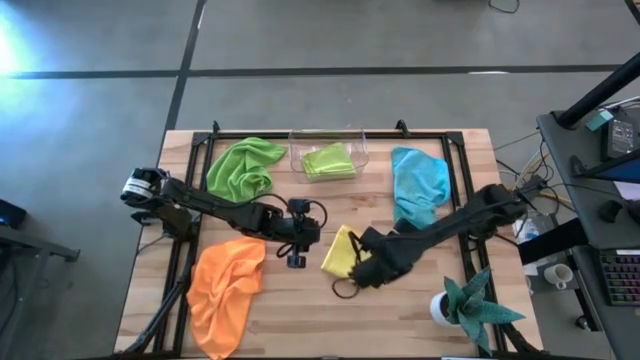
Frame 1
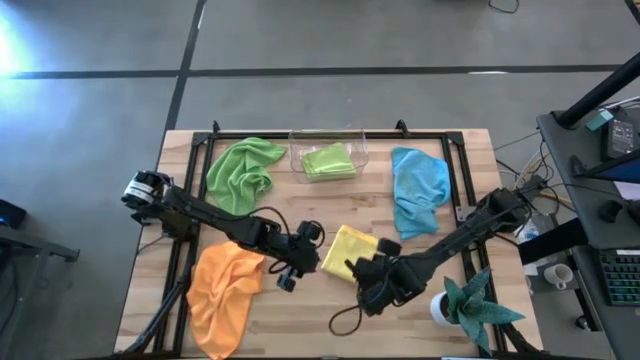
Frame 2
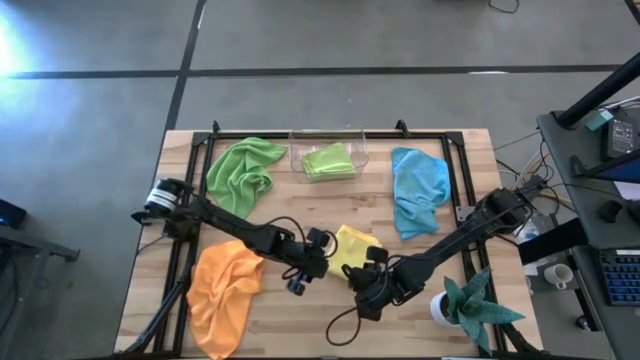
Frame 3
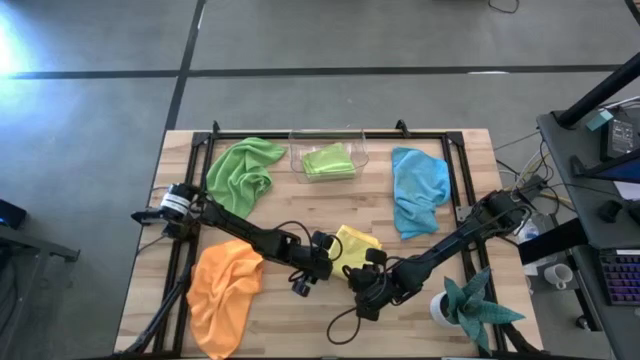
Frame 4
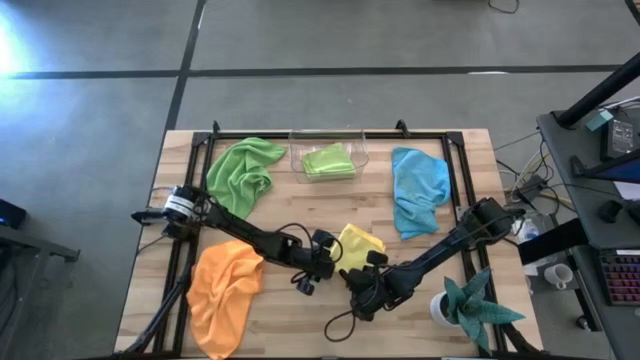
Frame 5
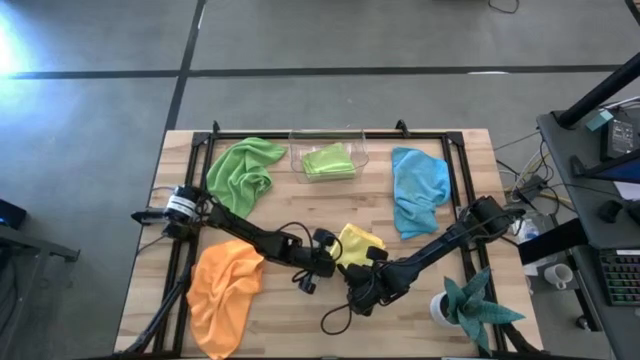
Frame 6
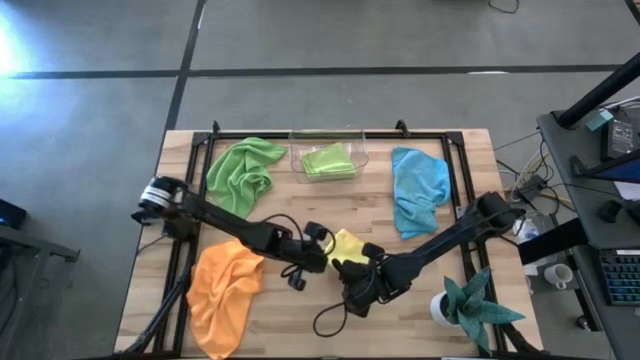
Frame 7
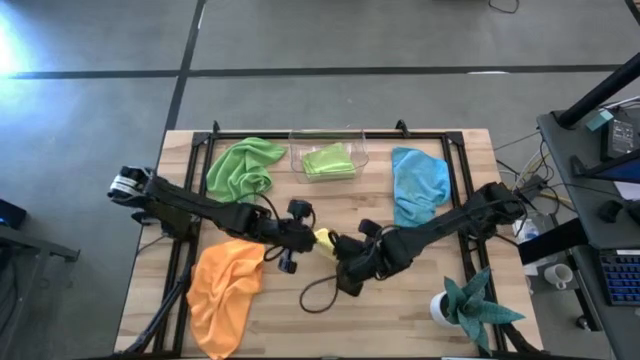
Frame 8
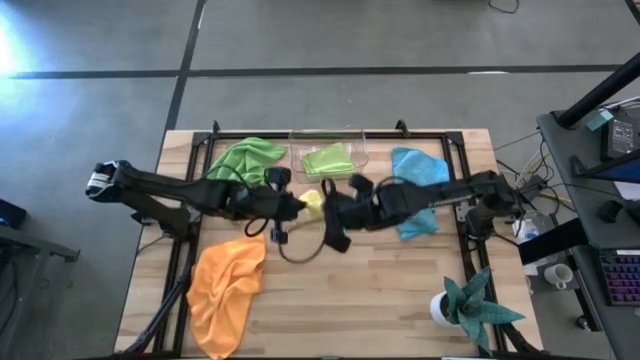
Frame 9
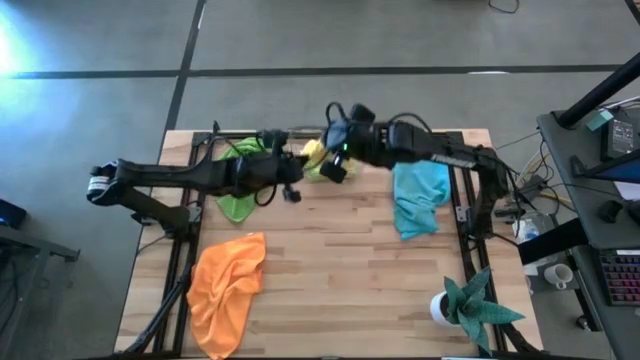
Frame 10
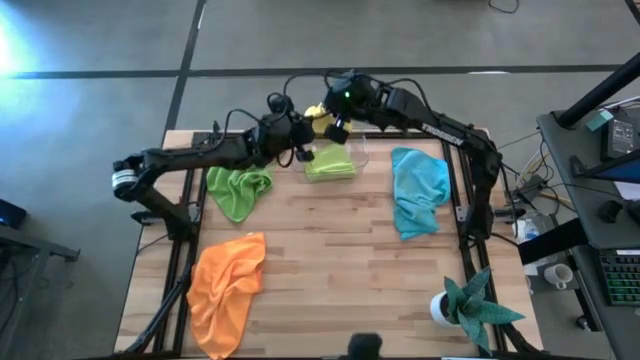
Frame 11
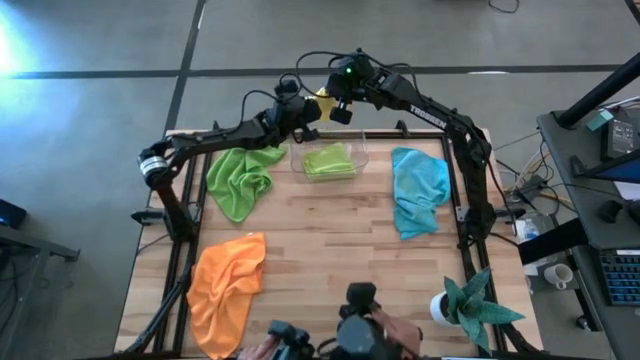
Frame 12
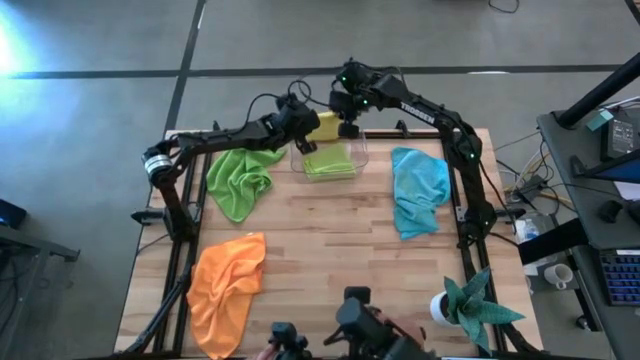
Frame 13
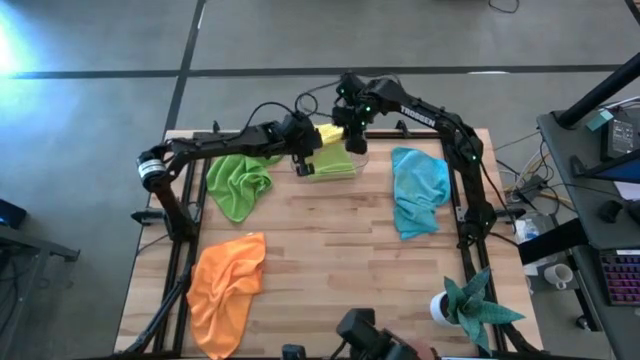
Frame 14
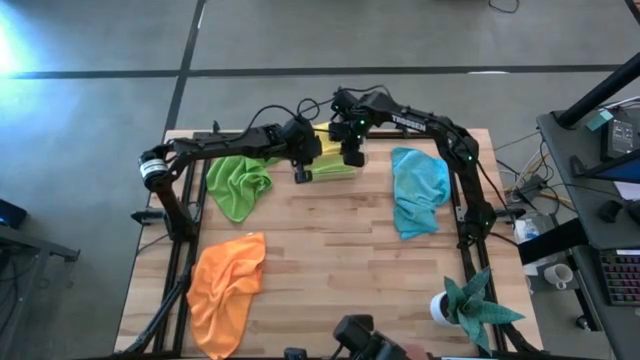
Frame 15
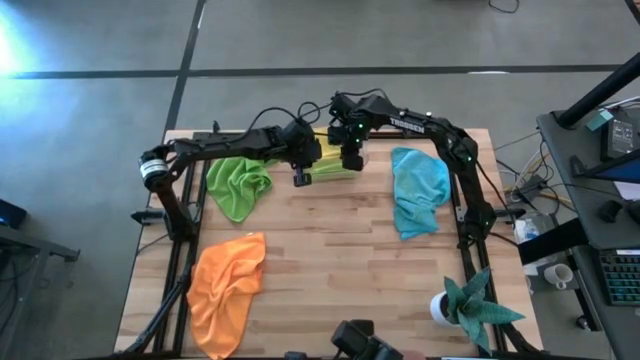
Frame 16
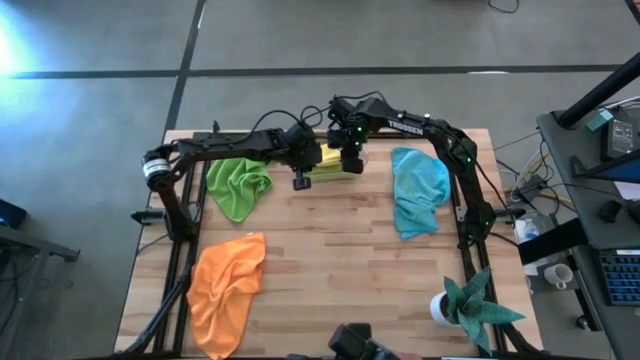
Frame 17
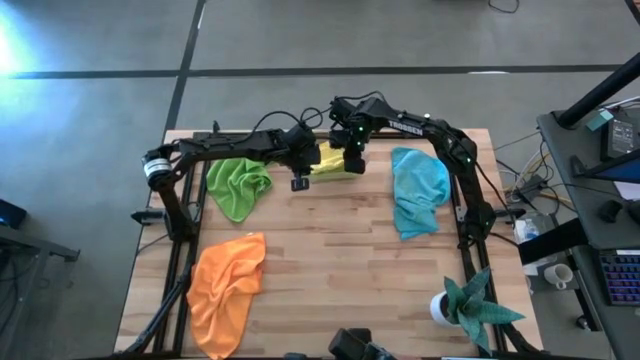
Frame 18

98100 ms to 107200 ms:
Task: Fold microfiber towels
Put the yellow microfiber towel into the transparent bin

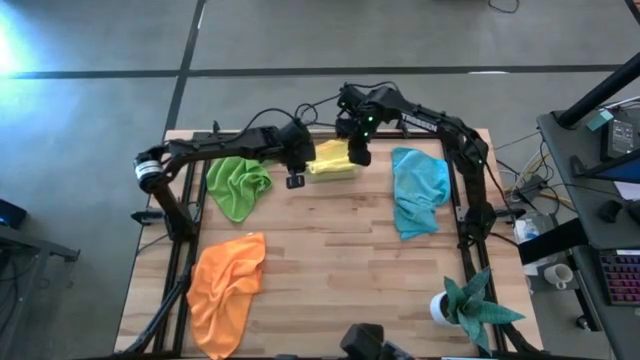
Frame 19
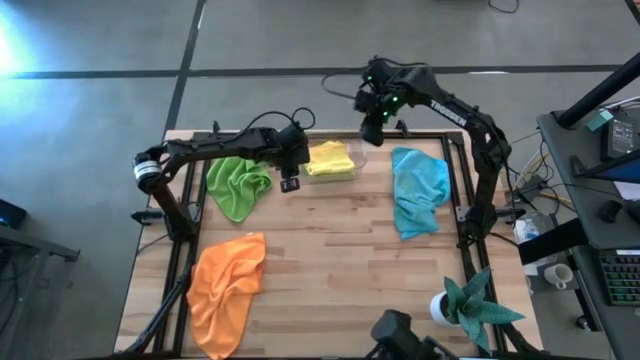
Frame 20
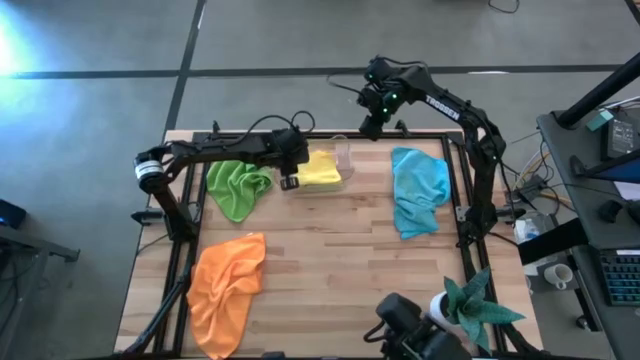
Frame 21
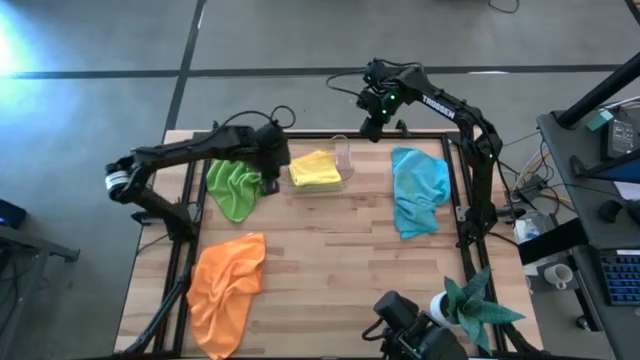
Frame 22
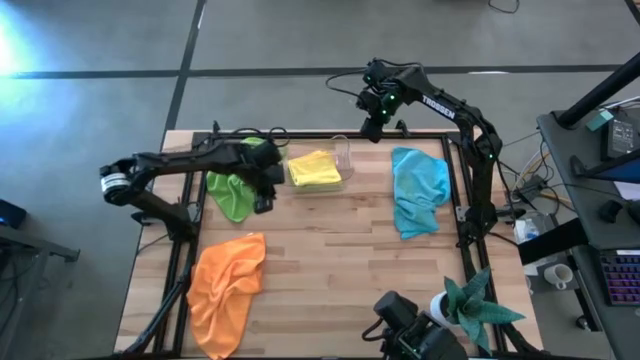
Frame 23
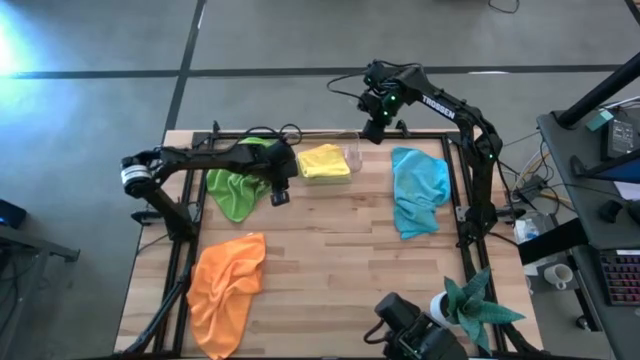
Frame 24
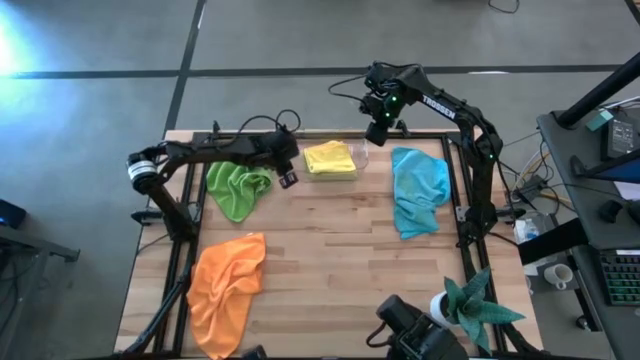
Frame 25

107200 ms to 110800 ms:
Adjust the transparent bin on the table

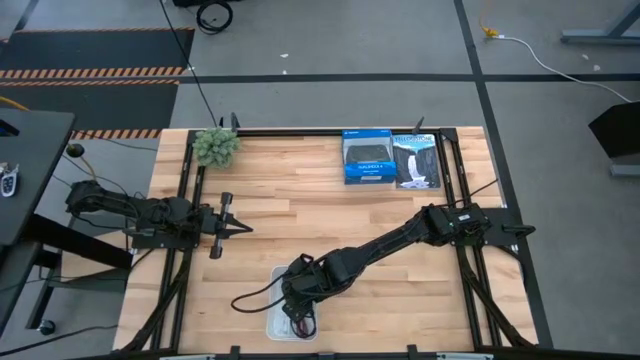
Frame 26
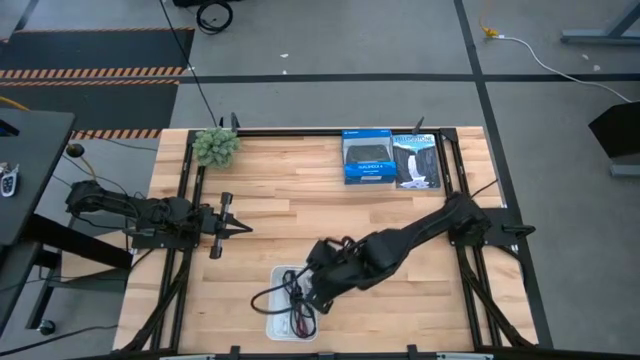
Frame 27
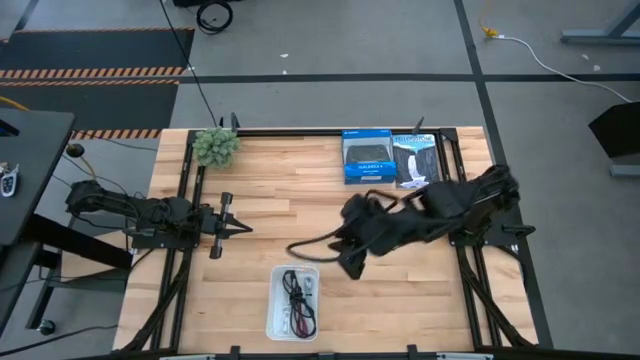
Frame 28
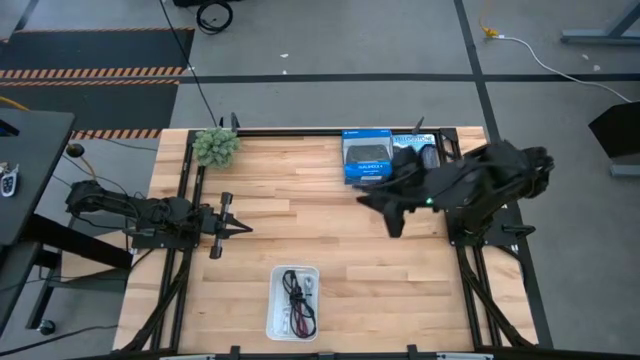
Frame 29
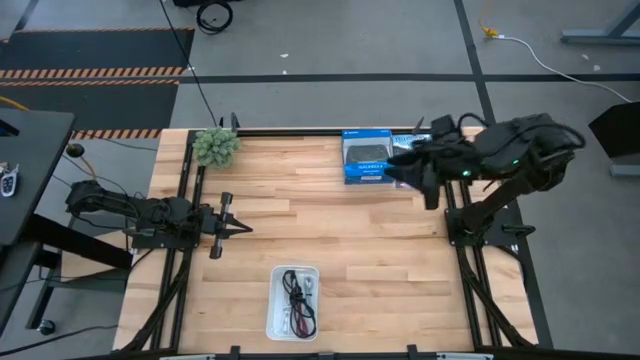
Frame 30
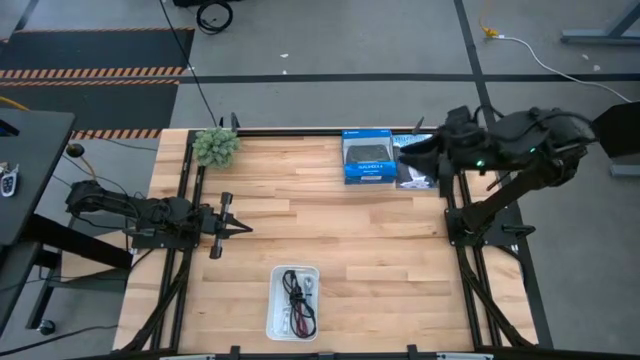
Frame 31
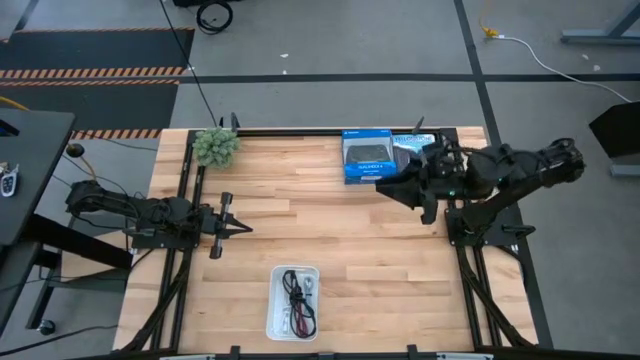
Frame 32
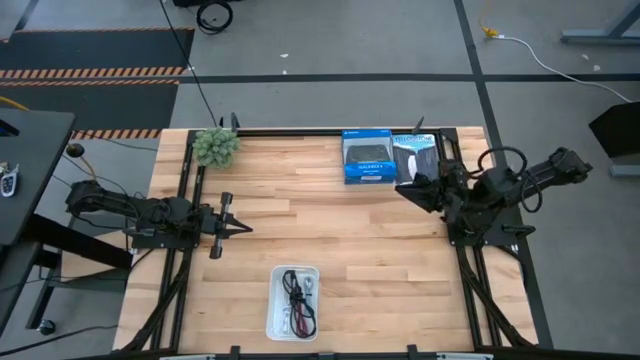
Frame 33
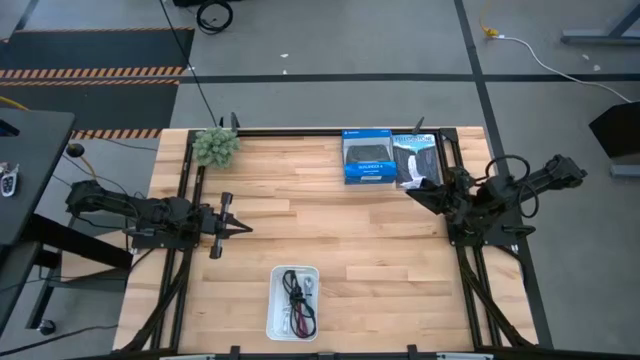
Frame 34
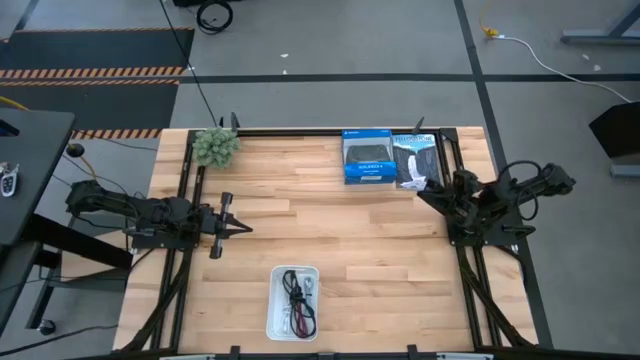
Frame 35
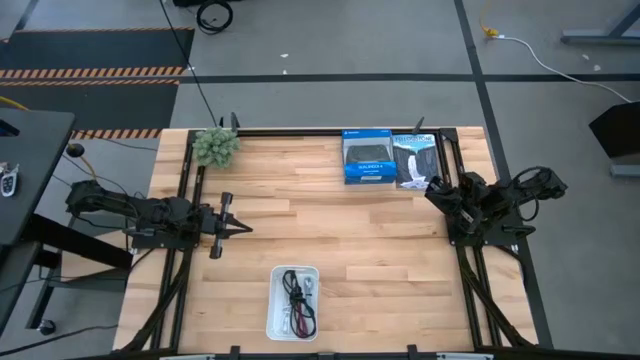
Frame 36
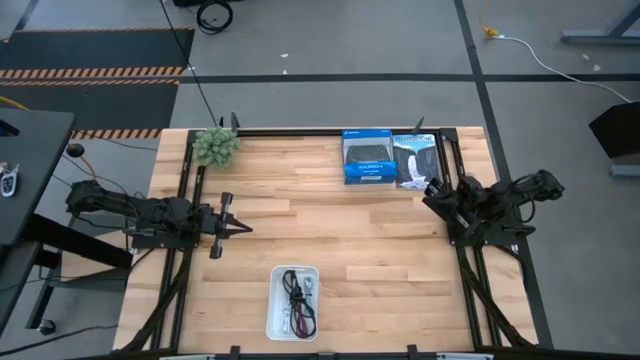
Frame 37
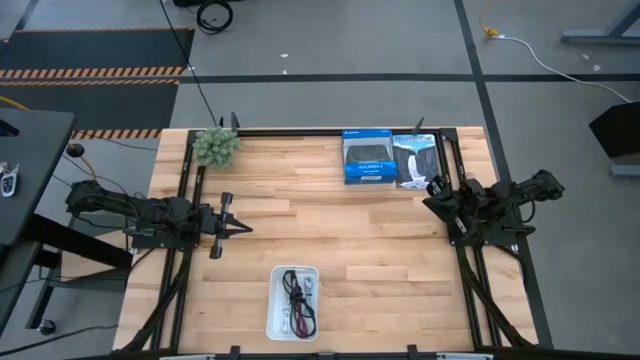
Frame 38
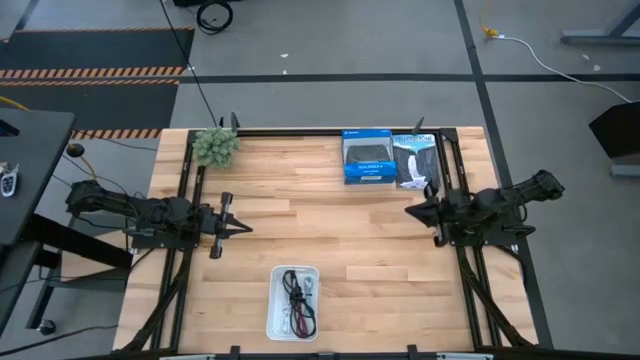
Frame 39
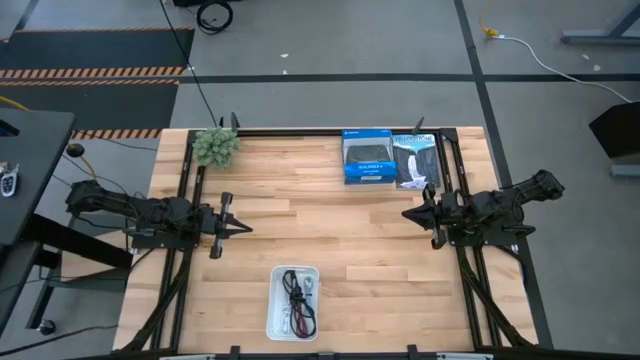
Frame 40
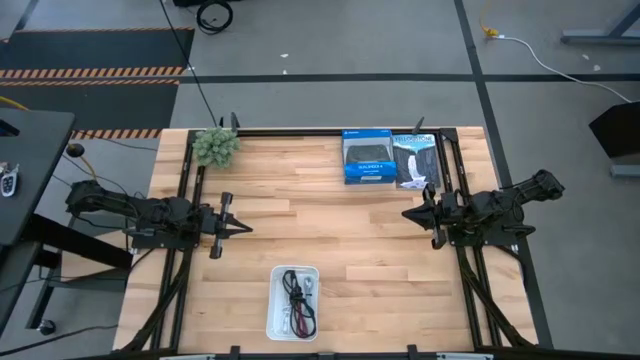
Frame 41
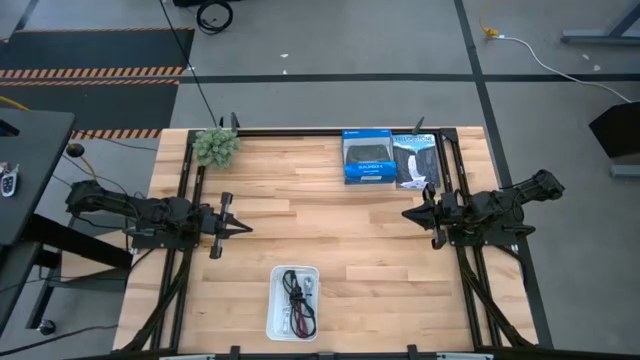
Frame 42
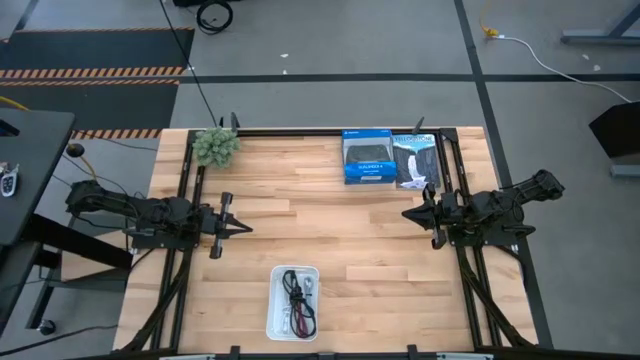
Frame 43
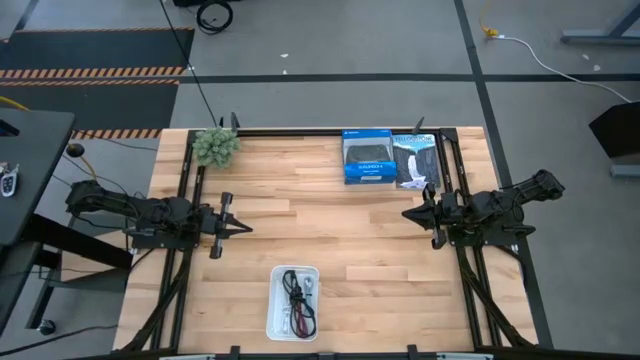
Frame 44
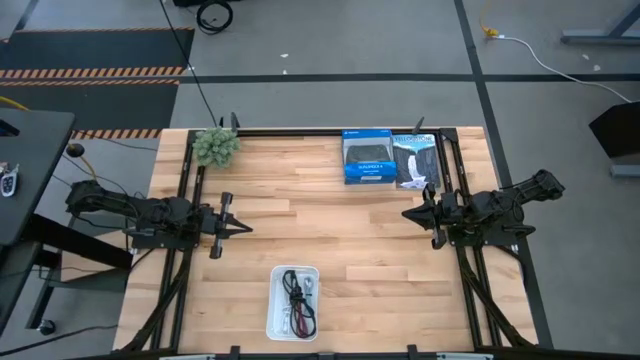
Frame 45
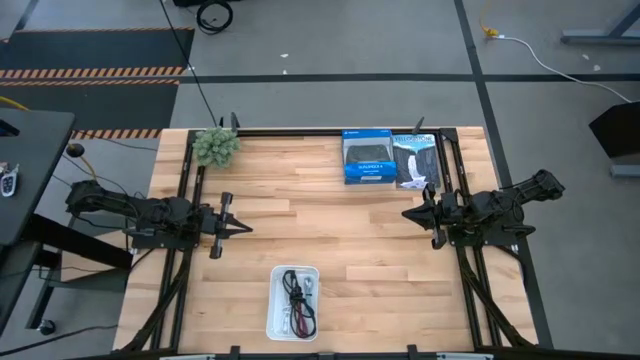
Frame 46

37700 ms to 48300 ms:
Task: Pick and place USB-C Cables
Return to Home Position
